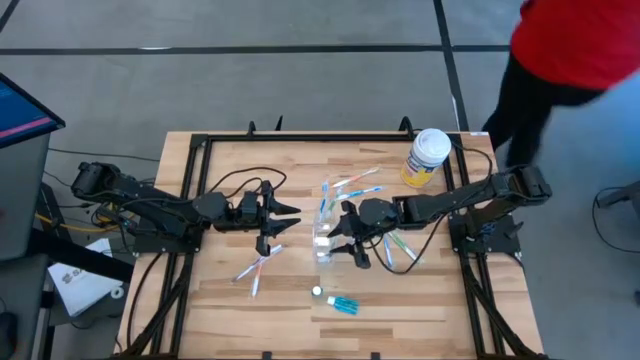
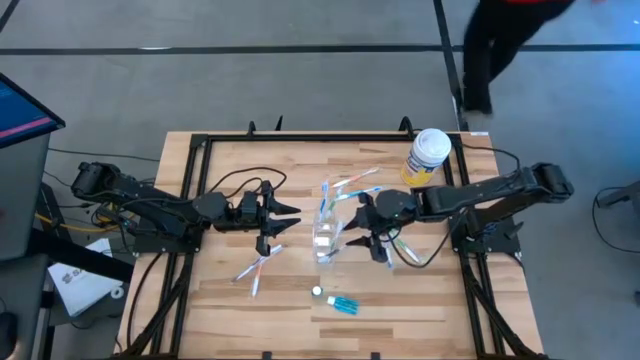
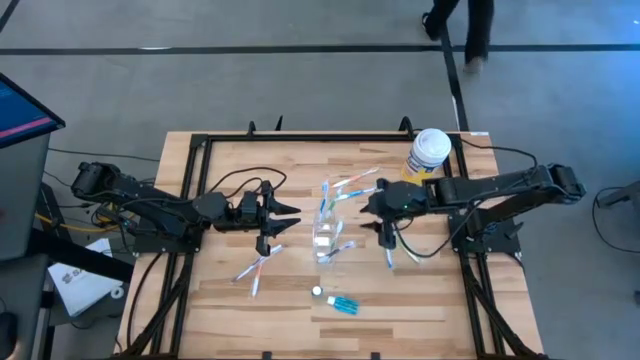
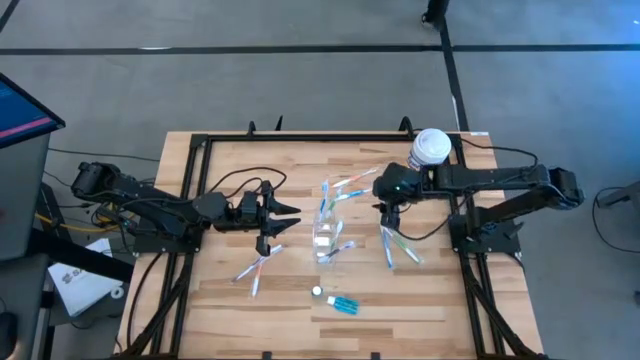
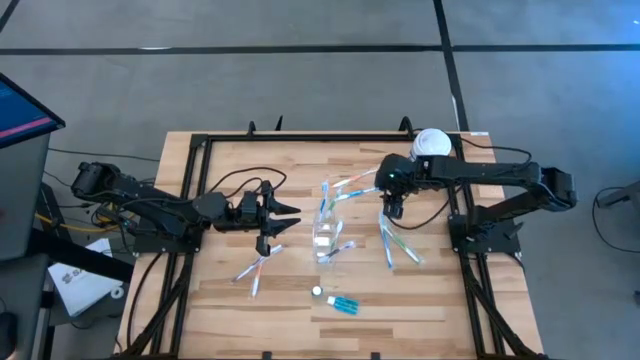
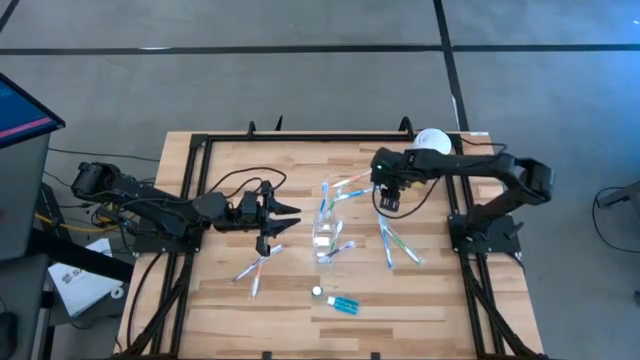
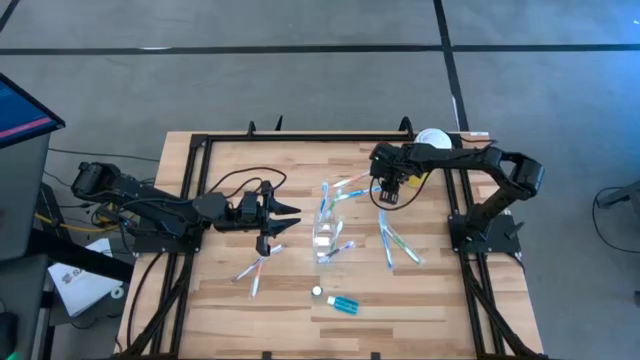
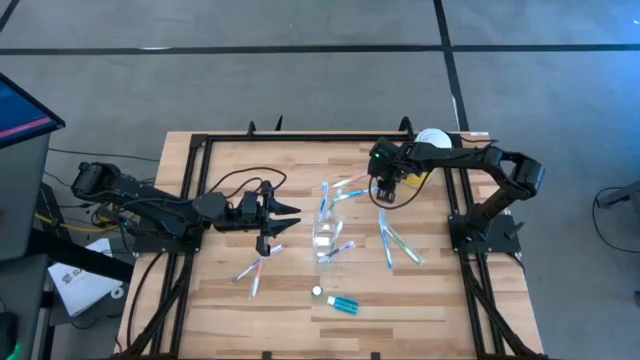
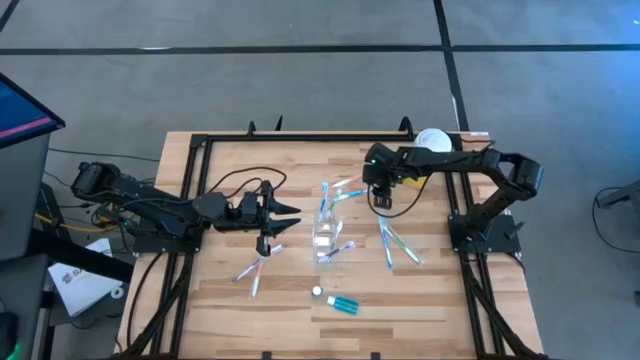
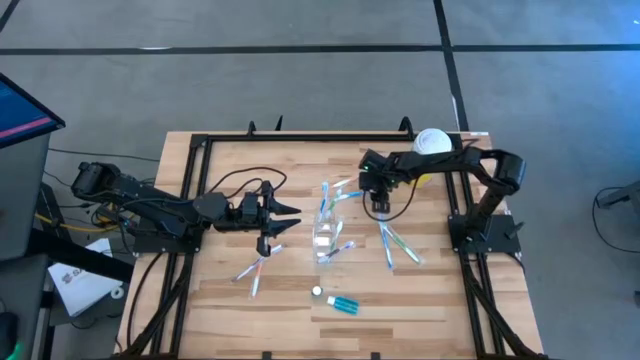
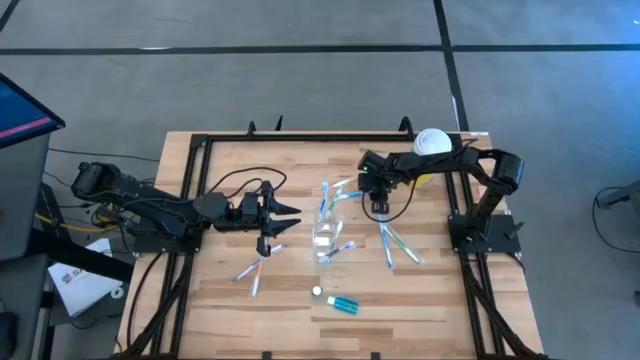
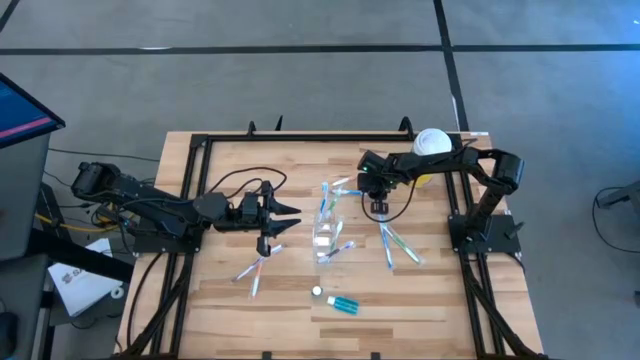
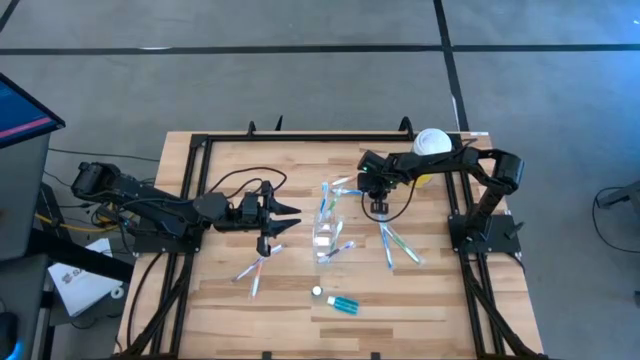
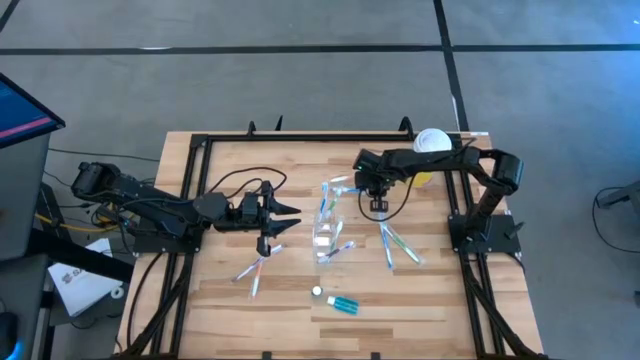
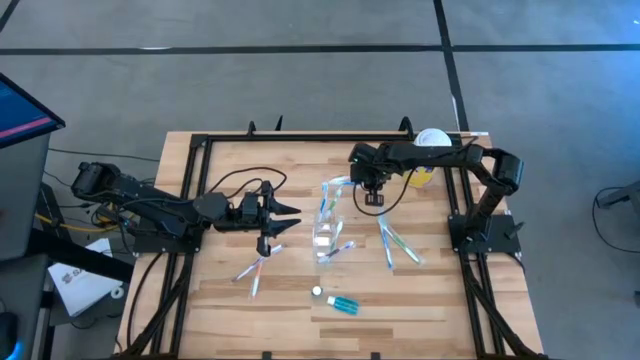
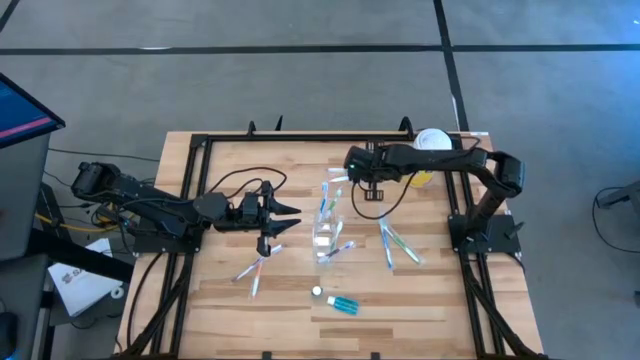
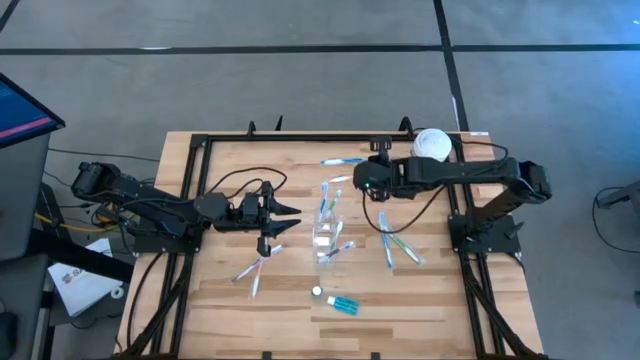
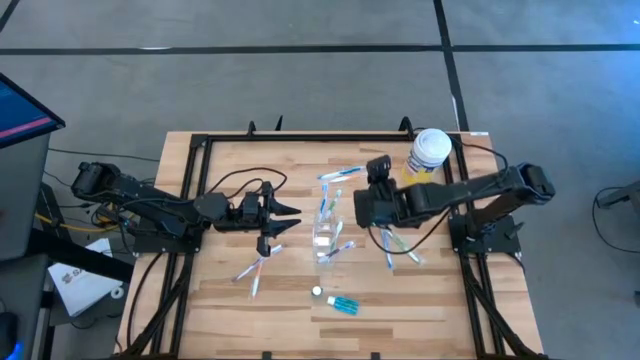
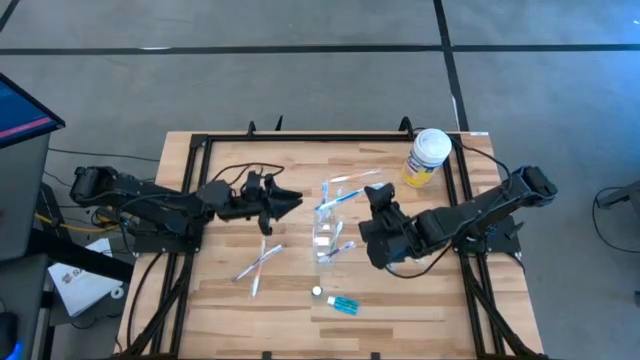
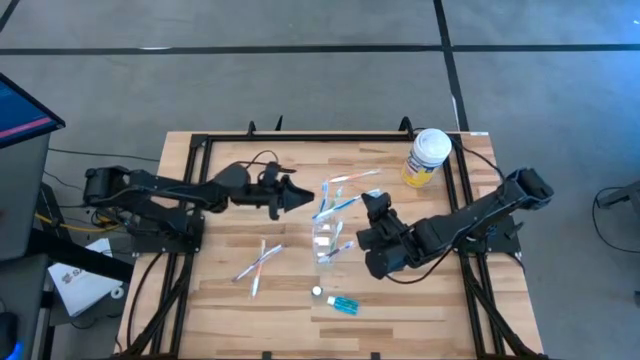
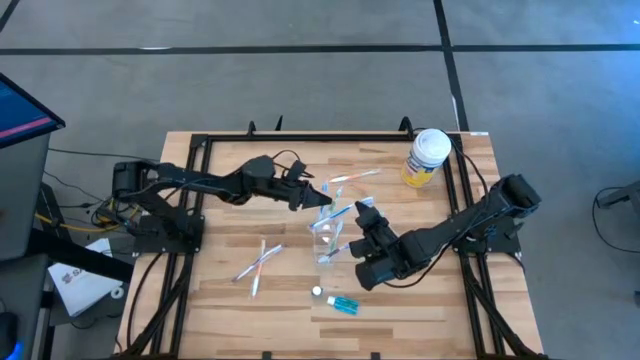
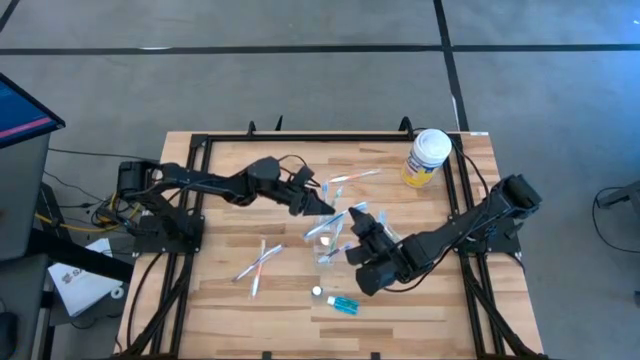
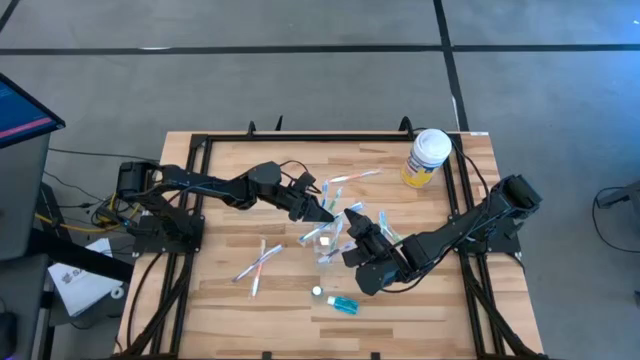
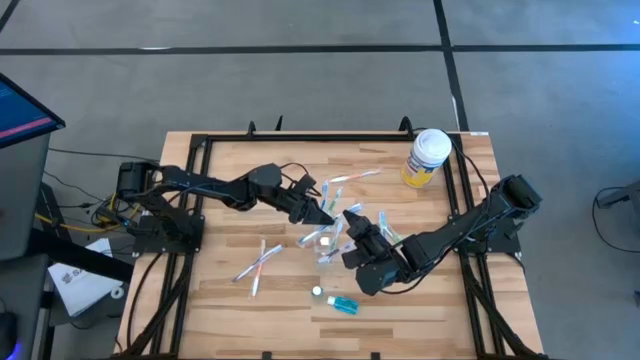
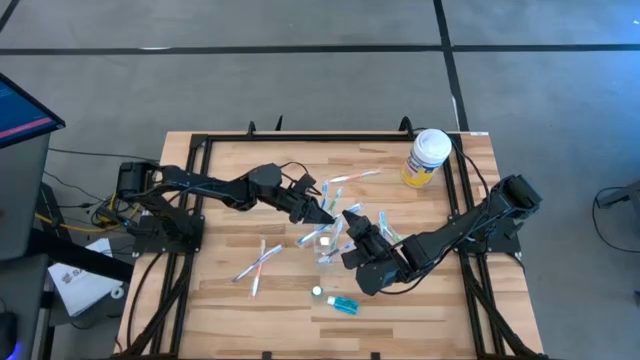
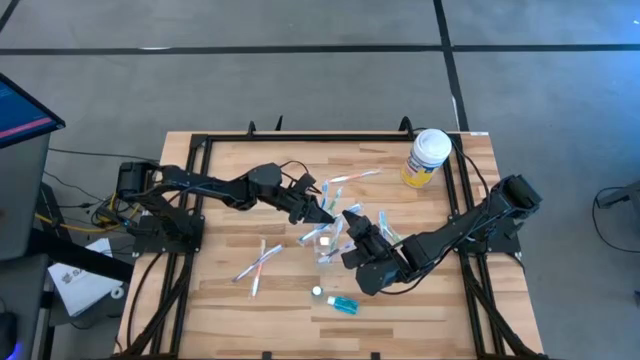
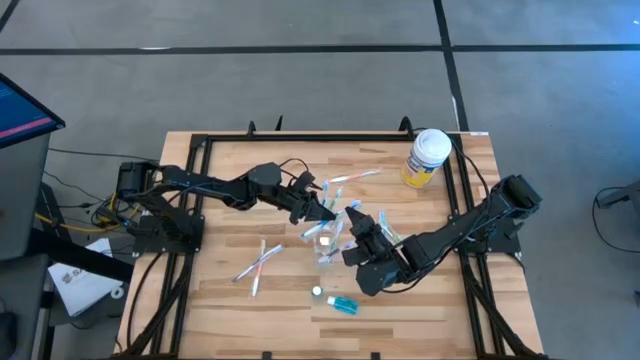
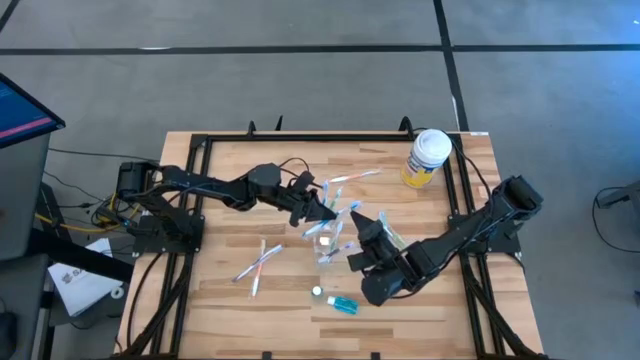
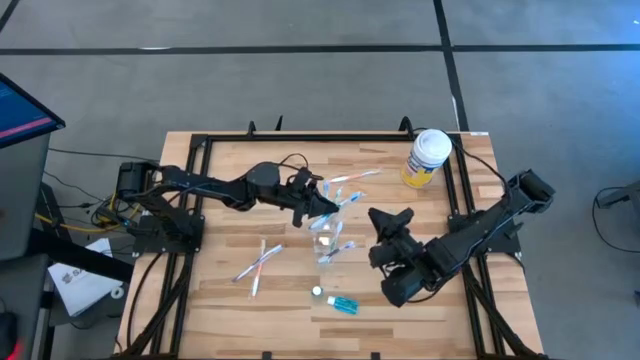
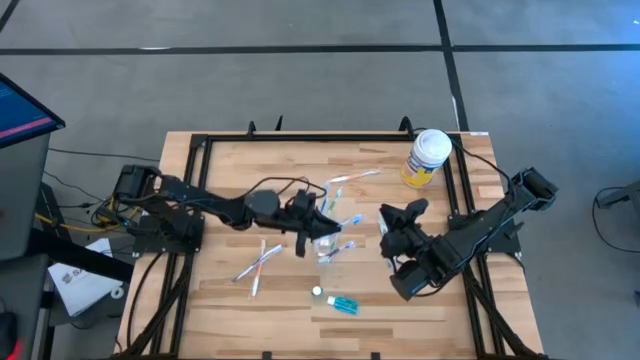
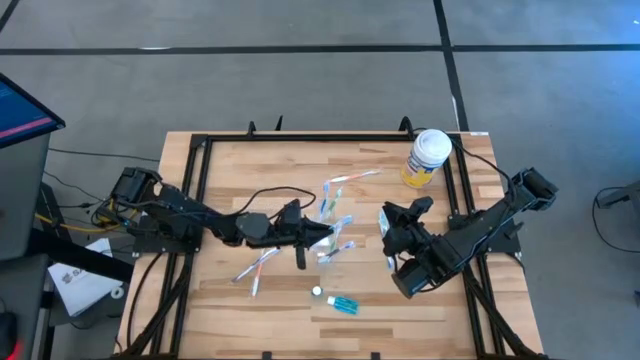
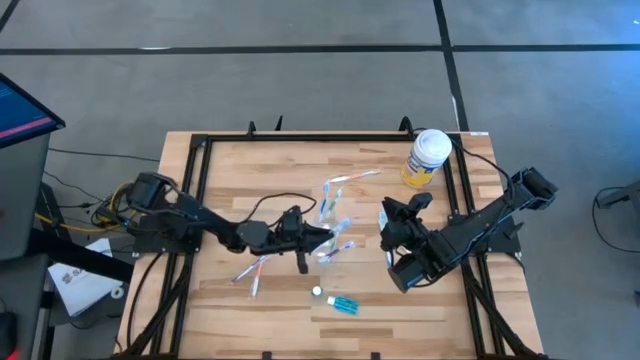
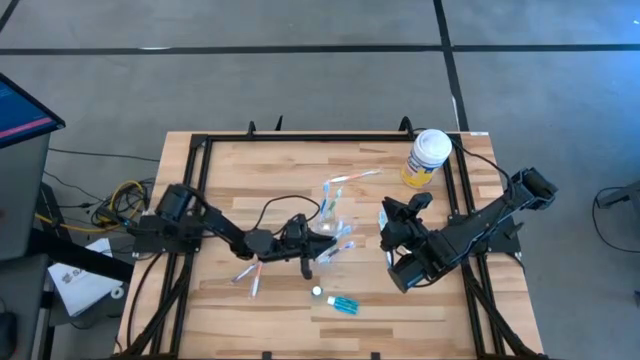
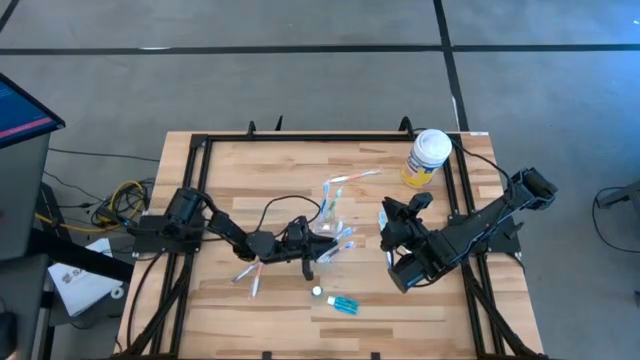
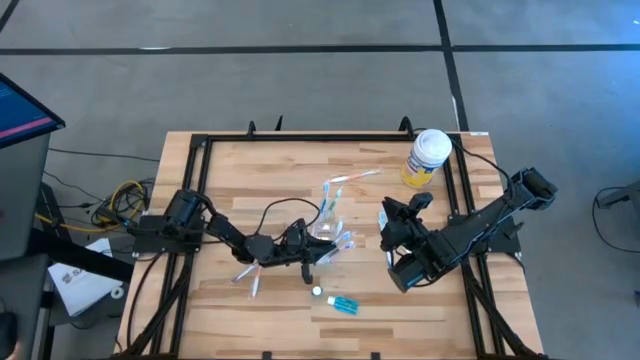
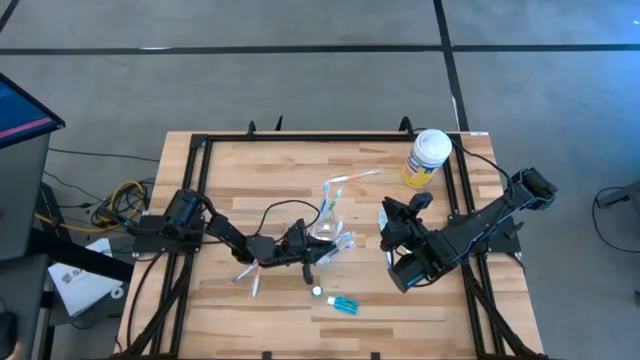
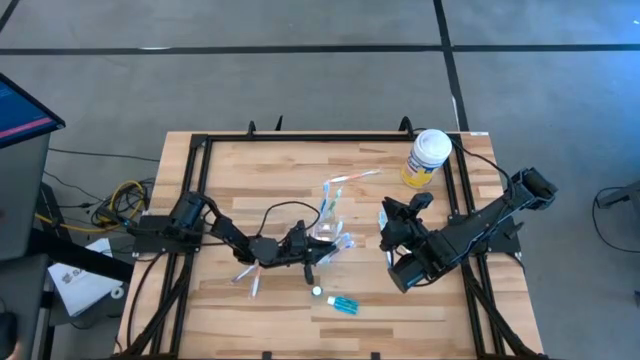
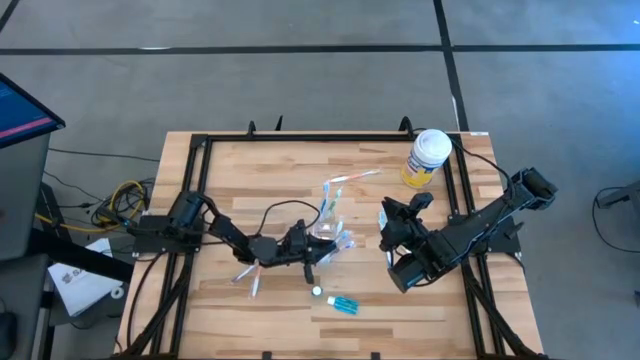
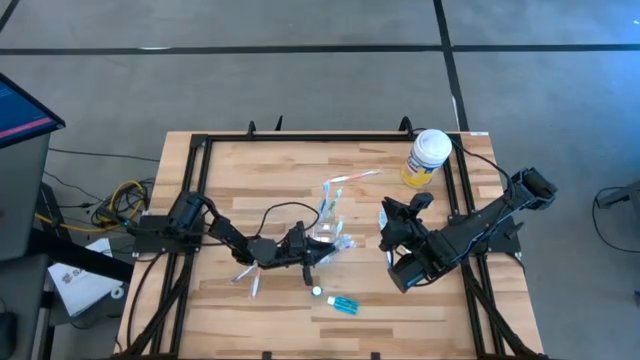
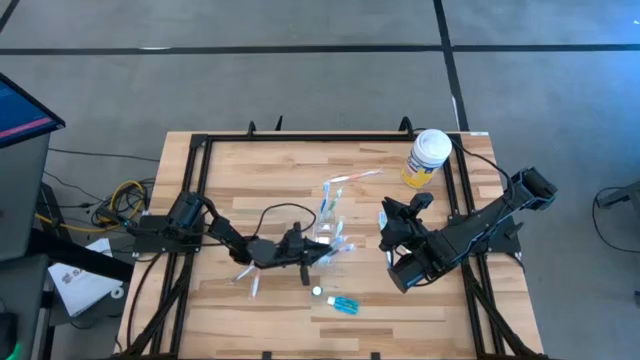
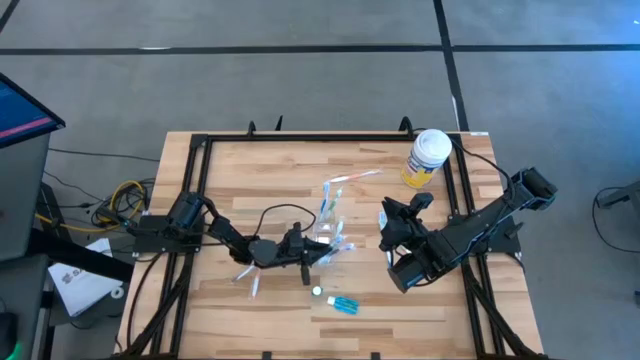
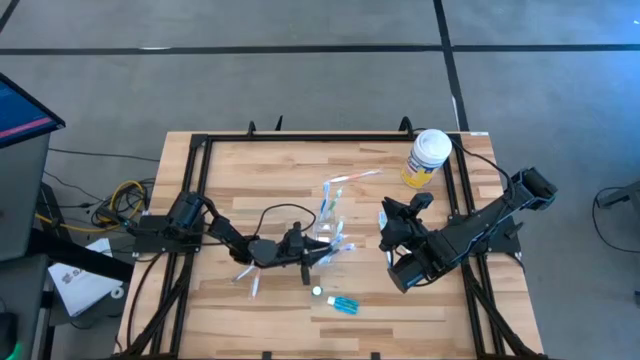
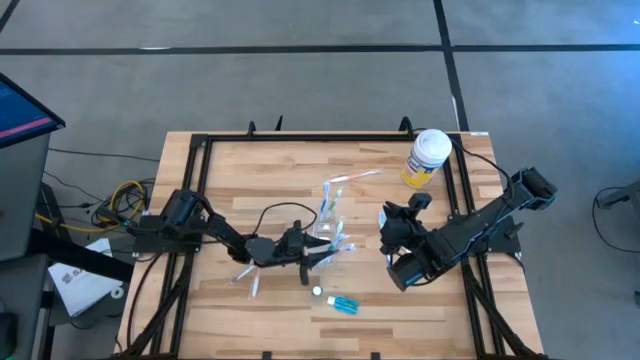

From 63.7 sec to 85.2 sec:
Task: Pick & Place toothbrushing station
Put the top blue toothbrush into the transparent organizer

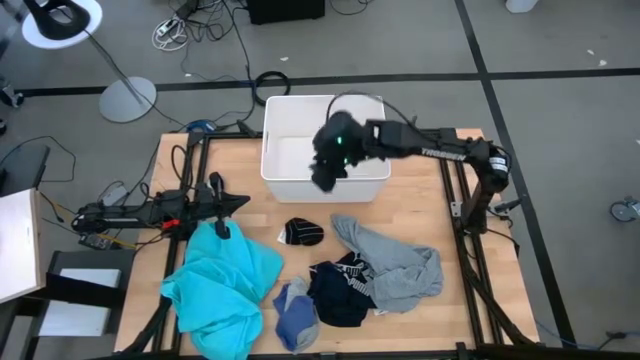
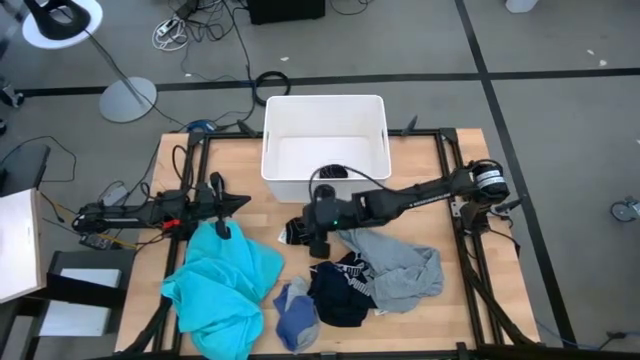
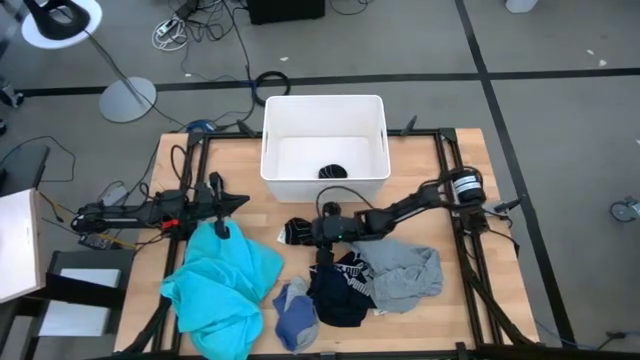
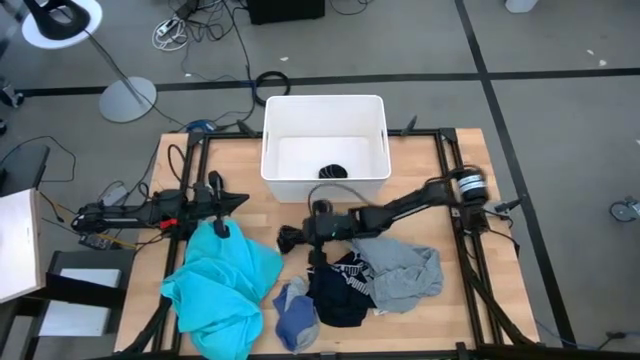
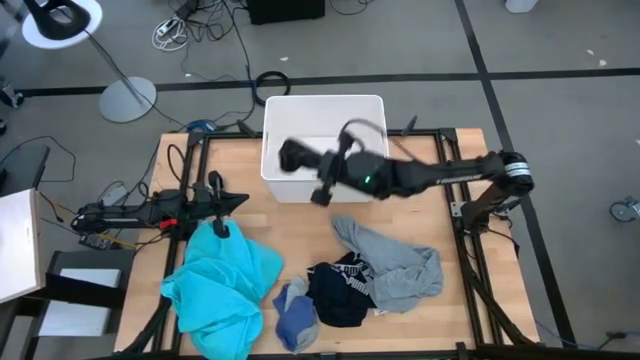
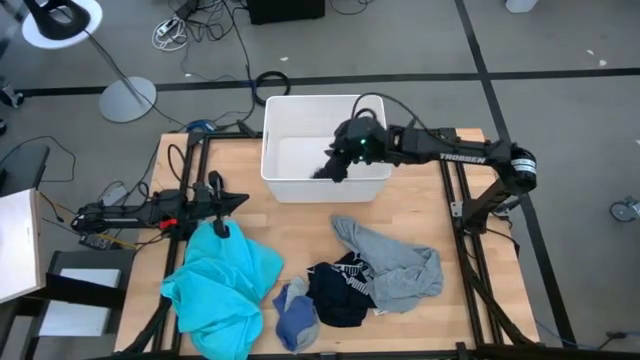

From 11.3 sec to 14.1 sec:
Task: Sort clothes
Put the black sock into the laundry bin
